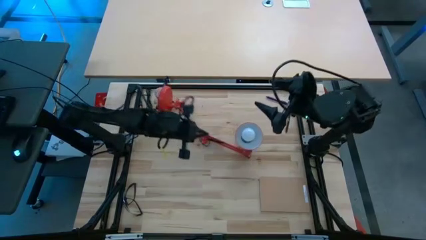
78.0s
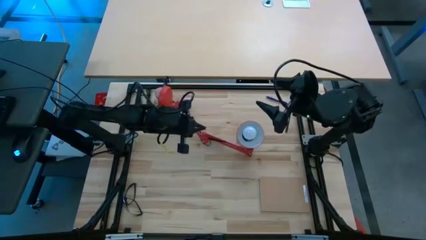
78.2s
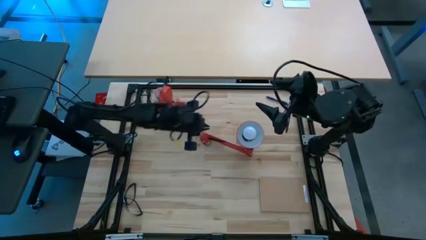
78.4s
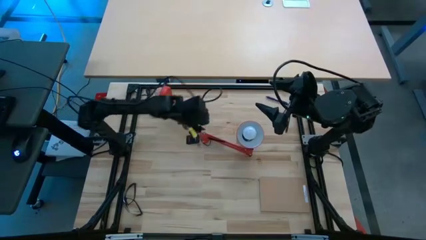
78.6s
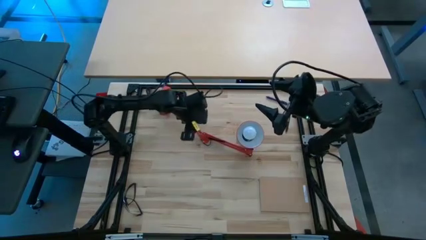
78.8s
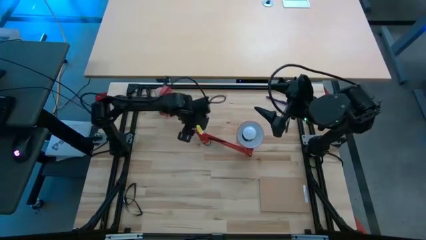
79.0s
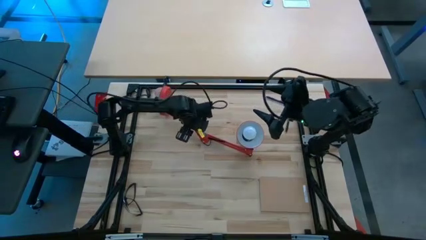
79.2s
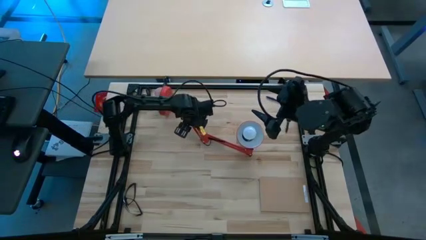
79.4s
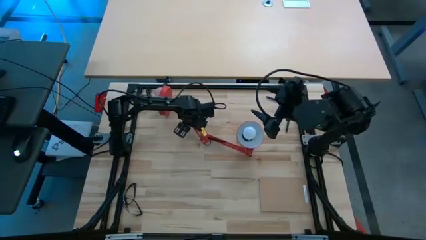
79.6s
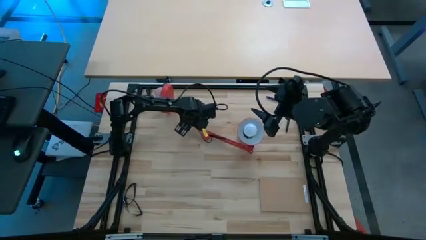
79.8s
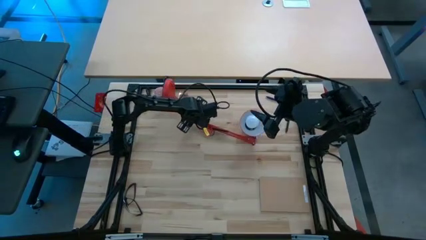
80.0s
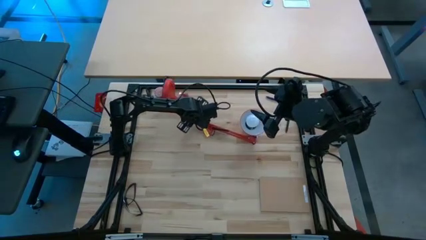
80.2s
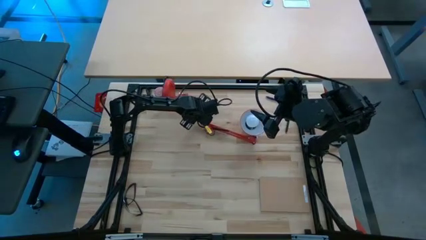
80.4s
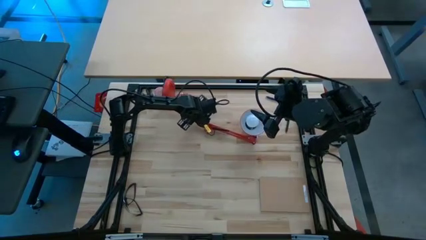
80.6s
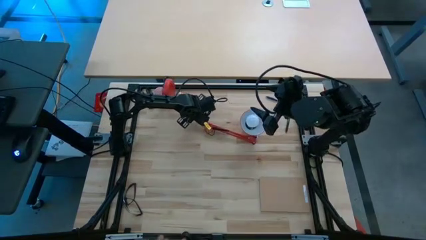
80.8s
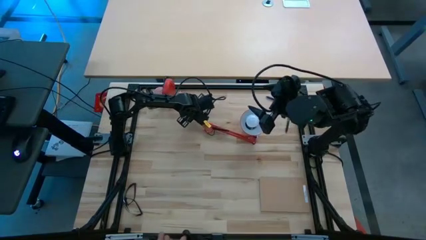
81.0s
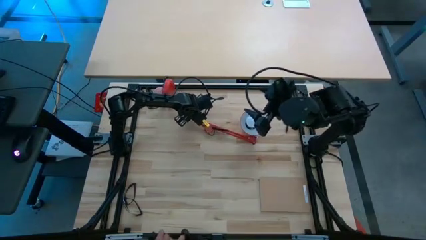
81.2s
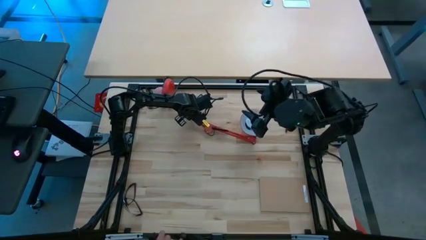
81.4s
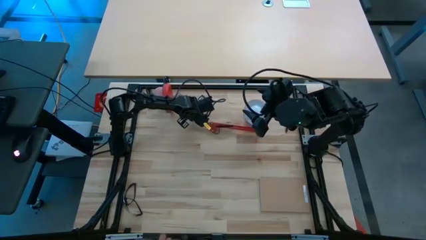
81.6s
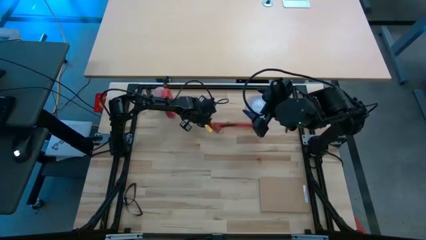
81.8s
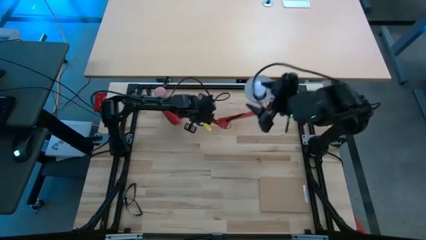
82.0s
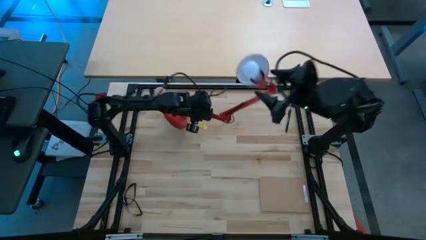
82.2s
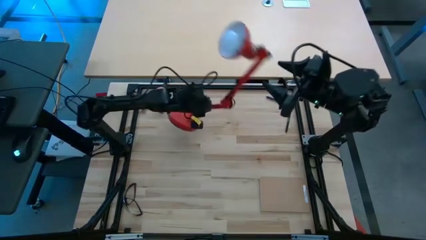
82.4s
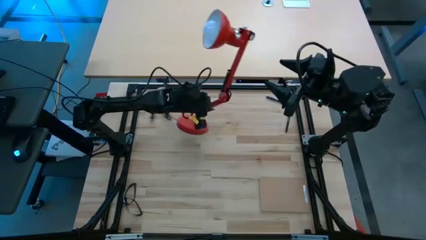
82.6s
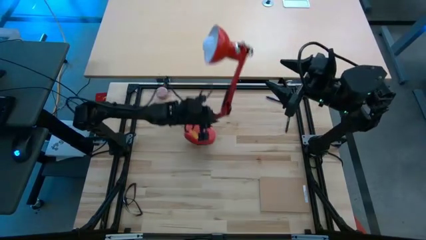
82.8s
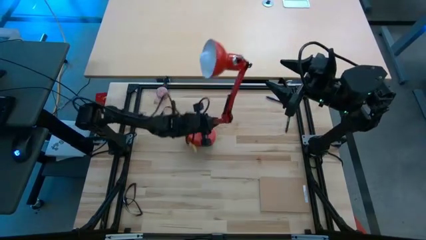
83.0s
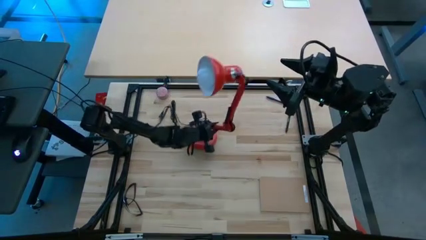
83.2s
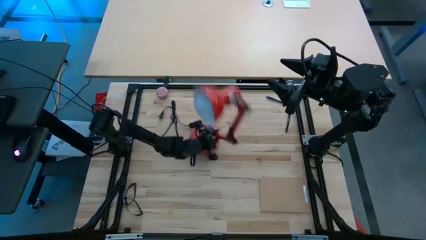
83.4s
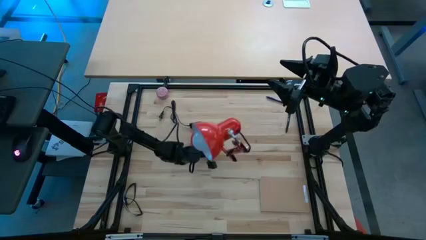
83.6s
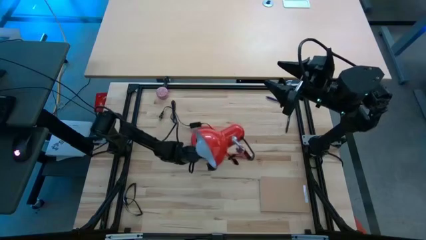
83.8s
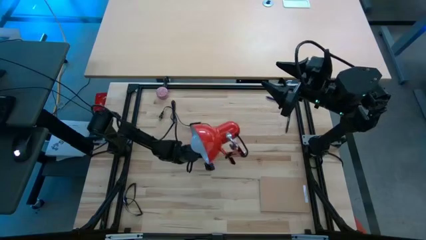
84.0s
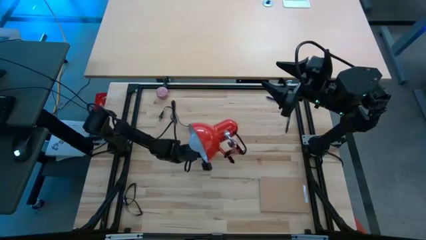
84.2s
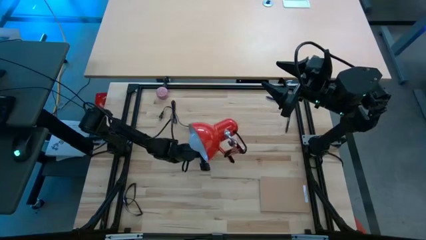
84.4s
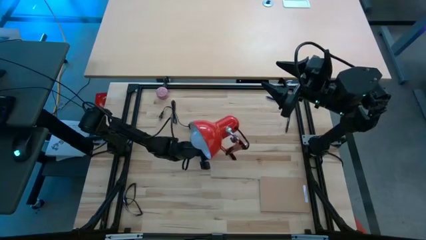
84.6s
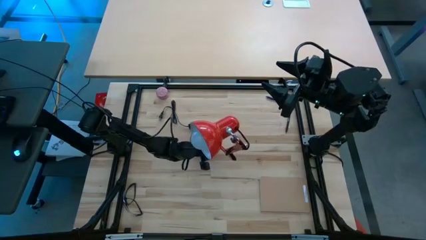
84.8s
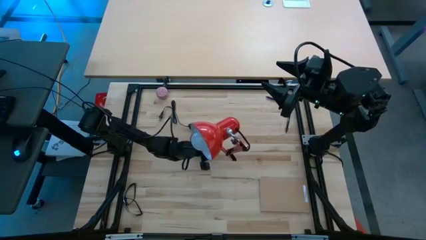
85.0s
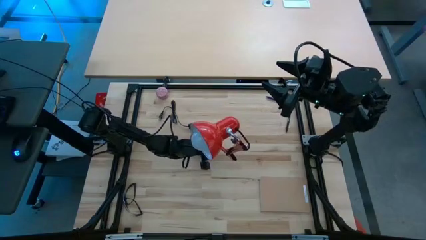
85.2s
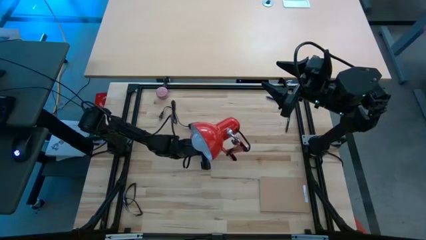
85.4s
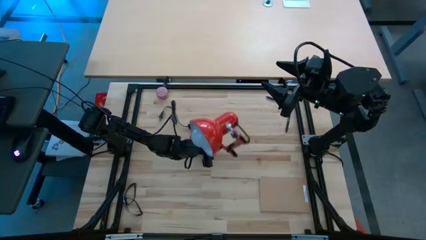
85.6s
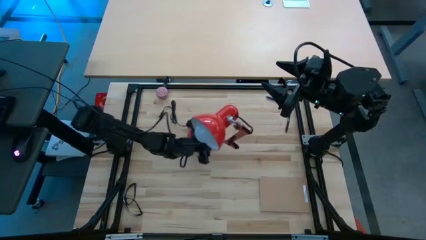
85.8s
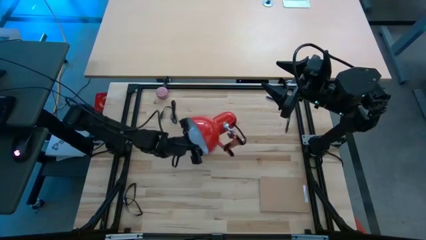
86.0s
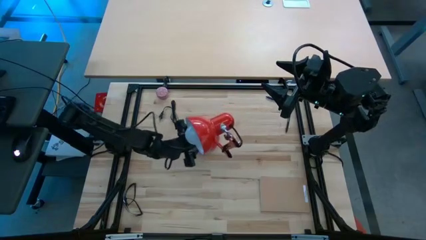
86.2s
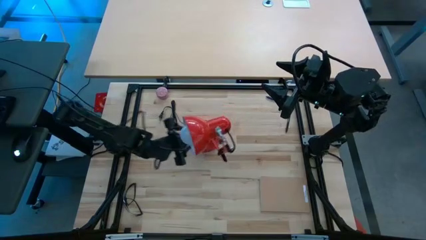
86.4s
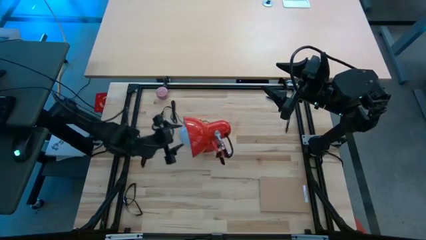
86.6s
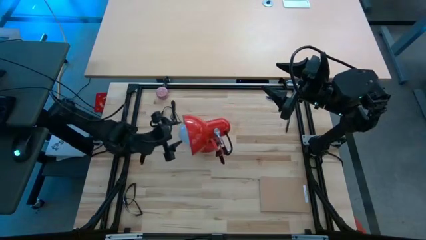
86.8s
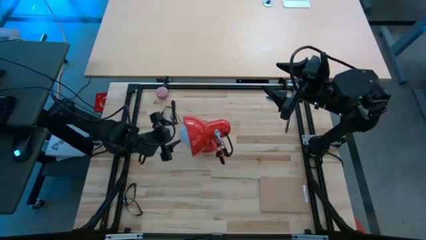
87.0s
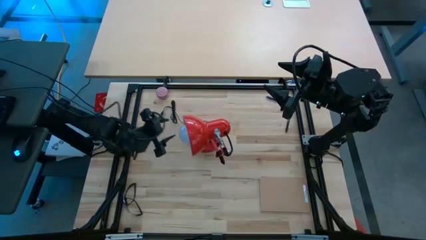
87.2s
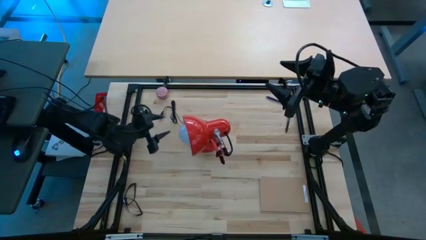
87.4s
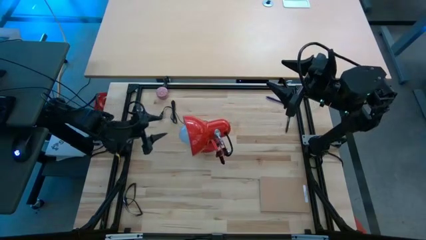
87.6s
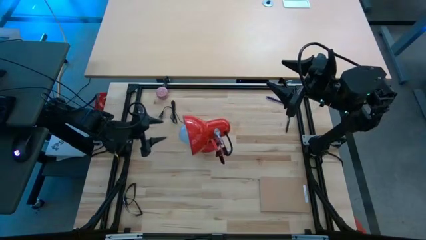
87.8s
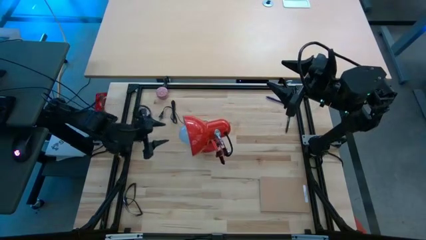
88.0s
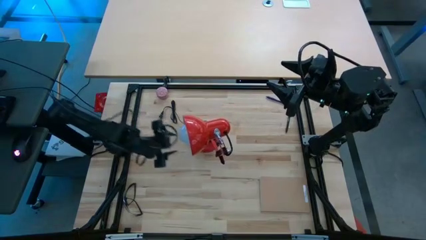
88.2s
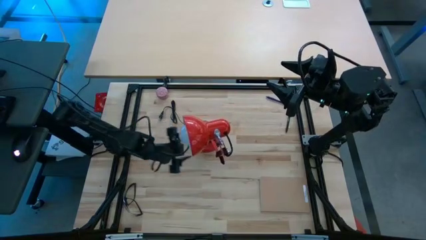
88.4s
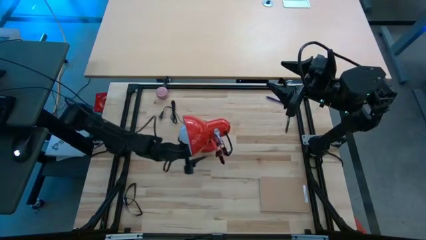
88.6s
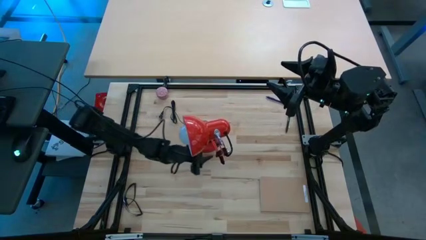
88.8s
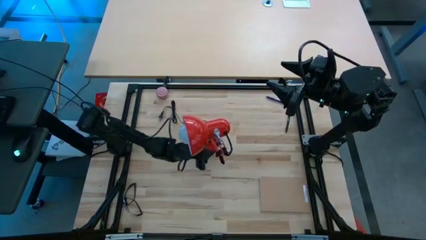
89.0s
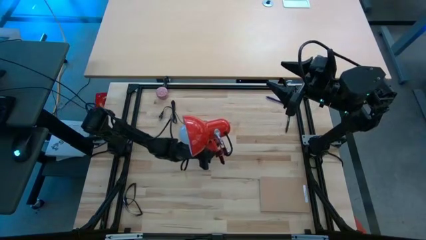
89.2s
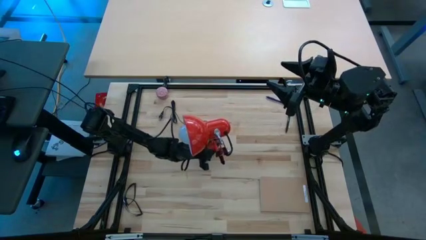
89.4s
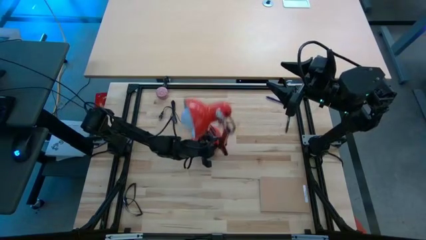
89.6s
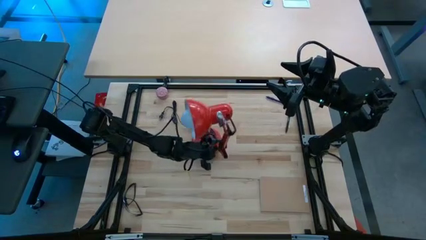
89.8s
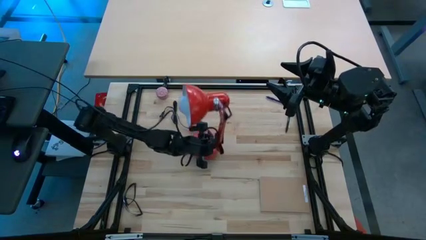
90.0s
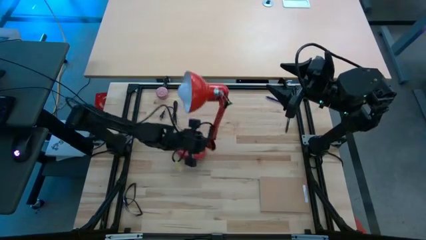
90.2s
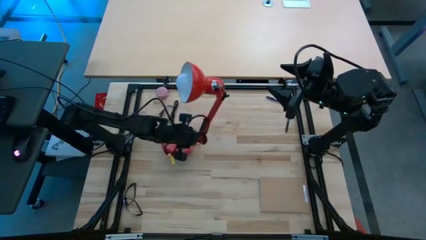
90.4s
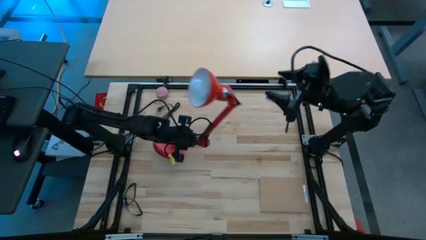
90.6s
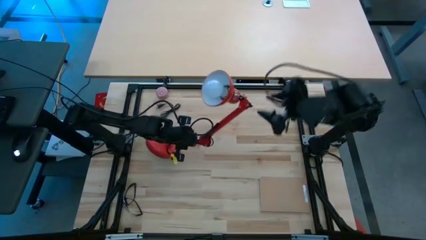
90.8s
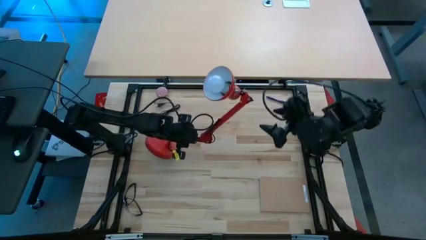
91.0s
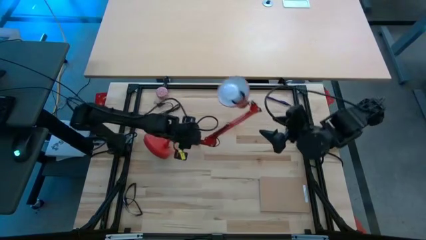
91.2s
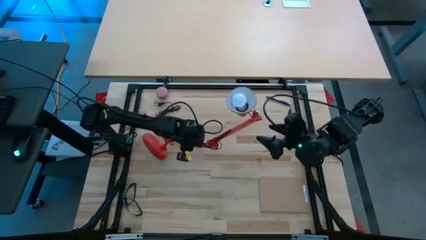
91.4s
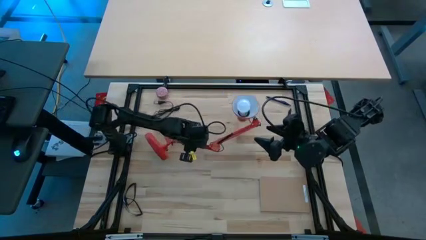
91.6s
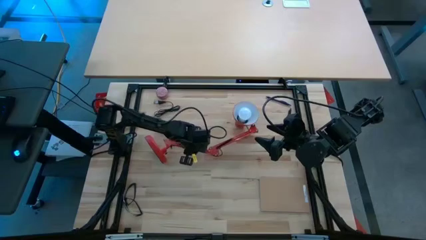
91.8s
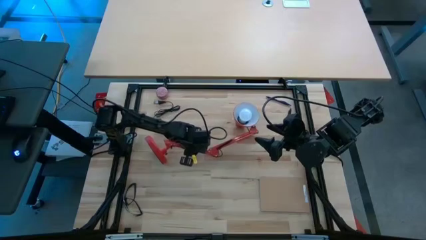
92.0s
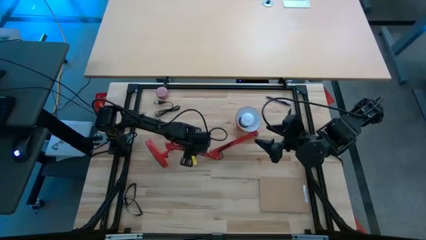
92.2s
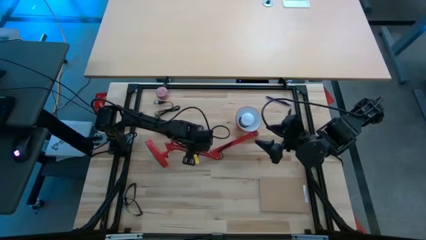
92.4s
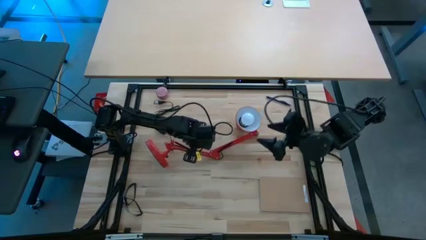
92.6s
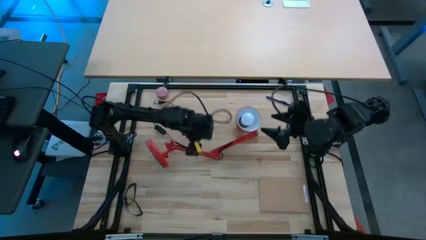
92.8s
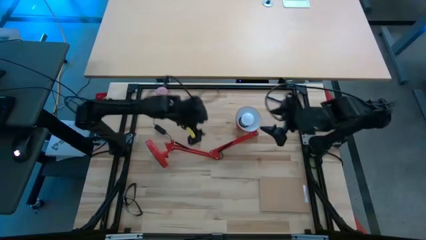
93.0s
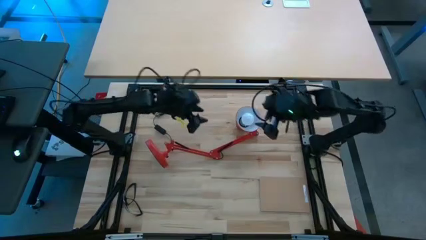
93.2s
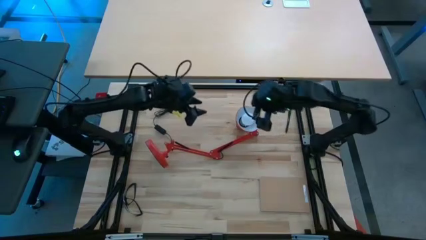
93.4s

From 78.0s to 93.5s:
Task: Screw lightbulb
Insert the lightbulb into the desk lamp
